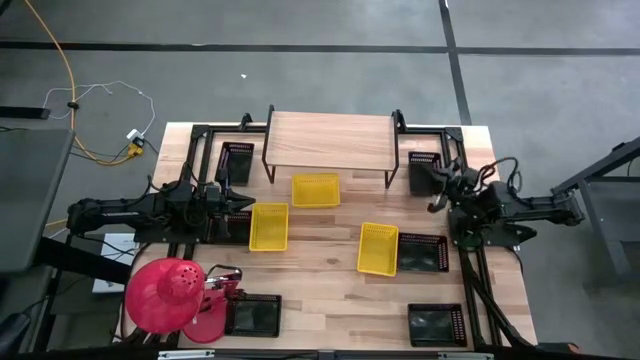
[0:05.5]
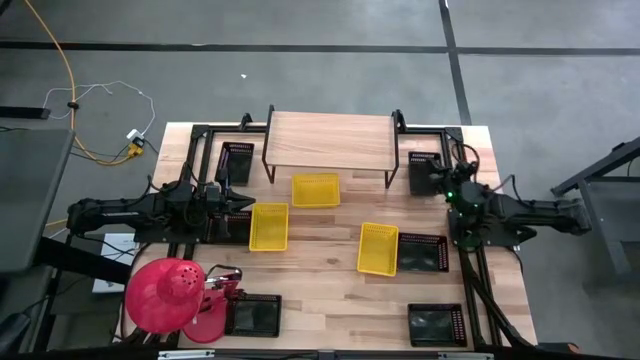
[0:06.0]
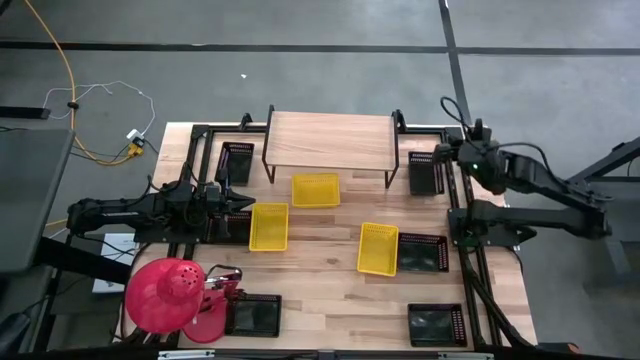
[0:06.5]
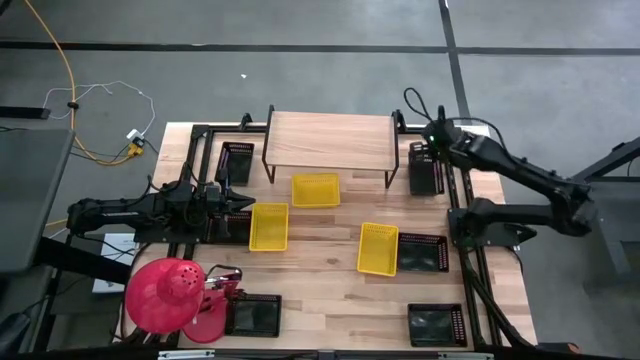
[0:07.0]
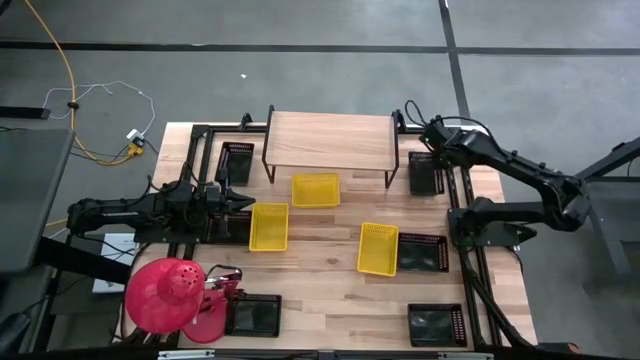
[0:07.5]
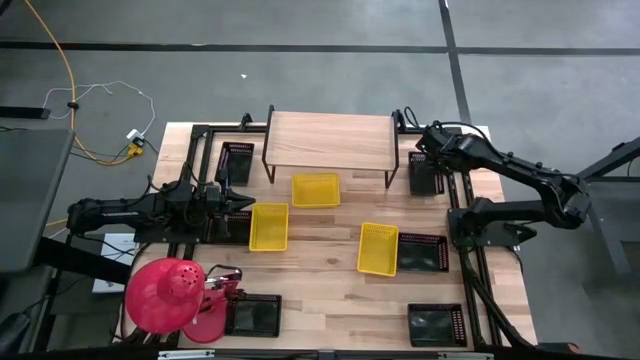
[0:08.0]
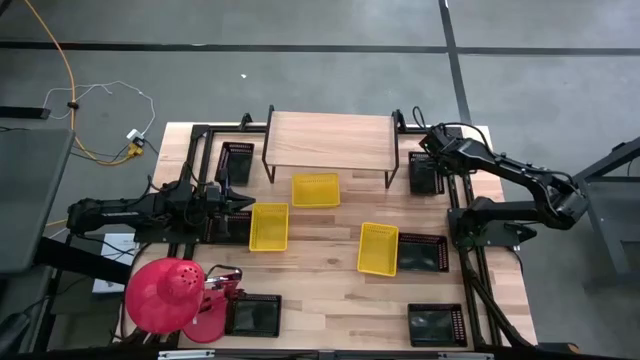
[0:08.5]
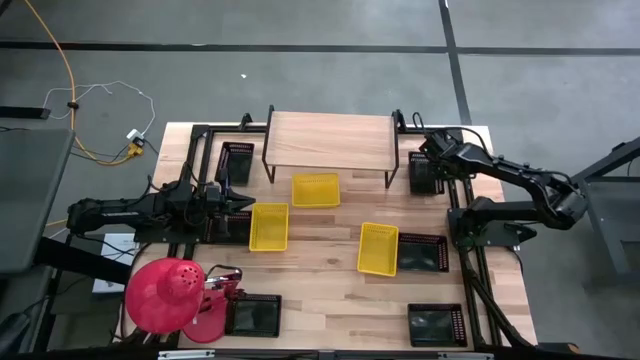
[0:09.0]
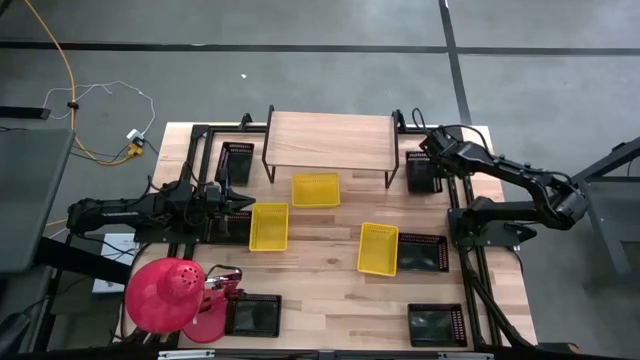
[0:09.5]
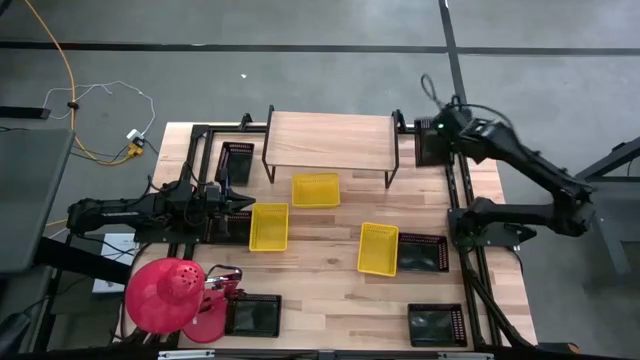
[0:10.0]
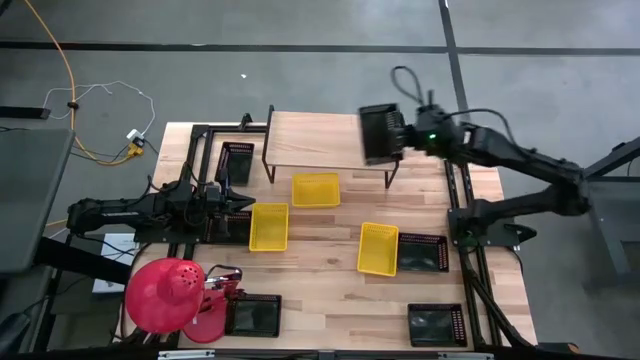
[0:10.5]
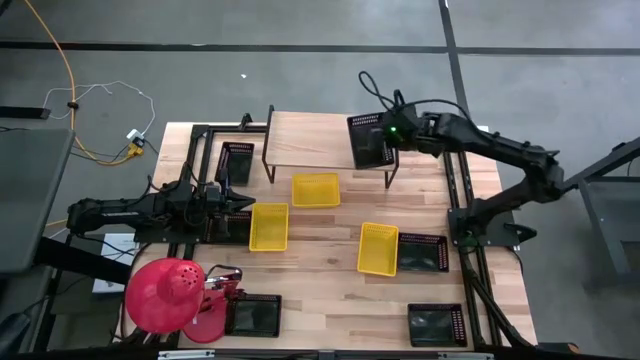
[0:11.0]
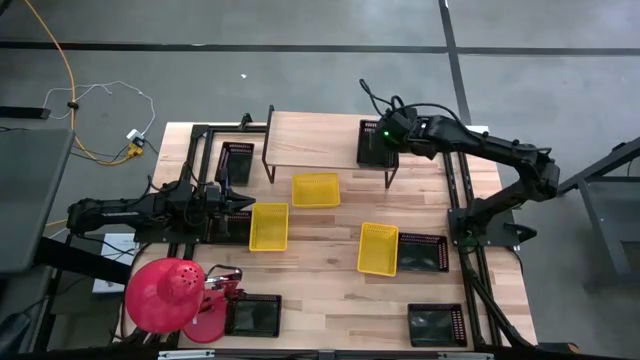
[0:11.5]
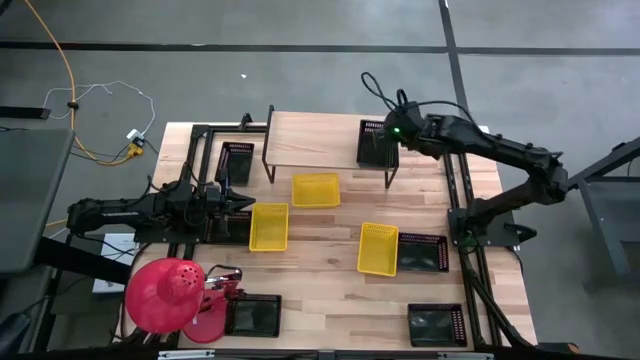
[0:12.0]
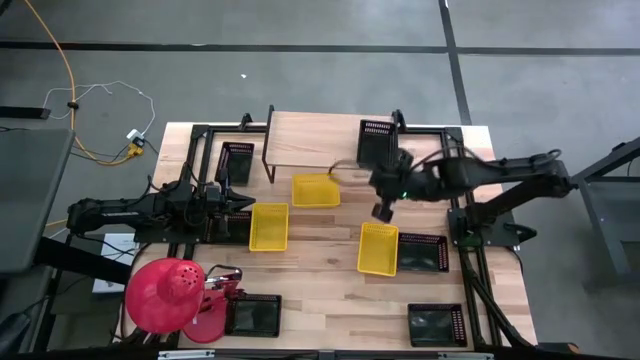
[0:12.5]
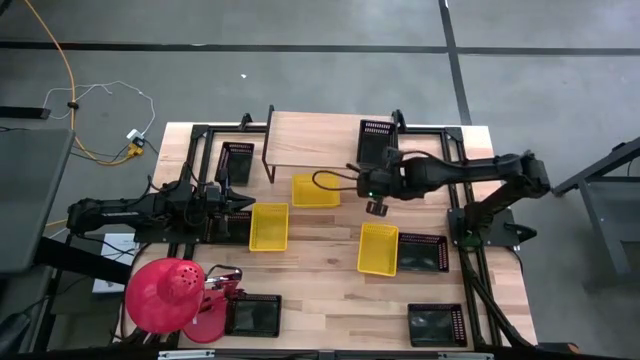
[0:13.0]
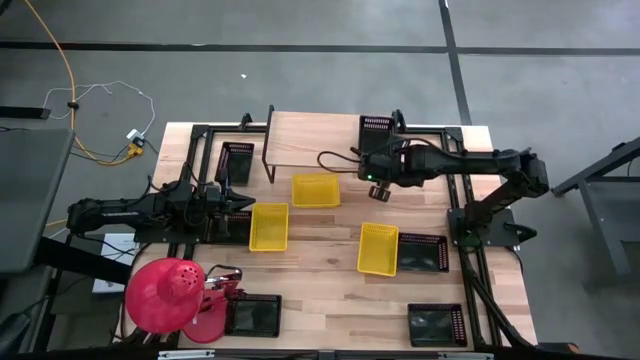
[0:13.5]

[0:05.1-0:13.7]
Task: Stack baskets on shelf by color
Put the black bin on the shelf

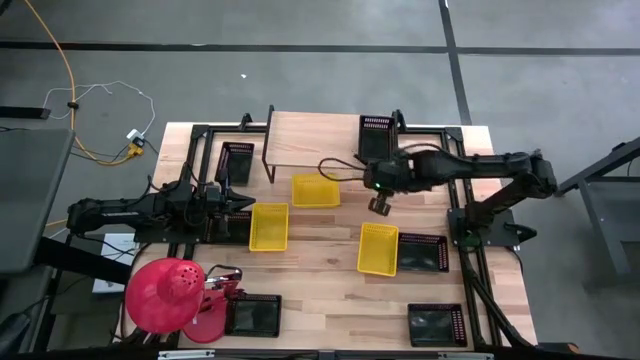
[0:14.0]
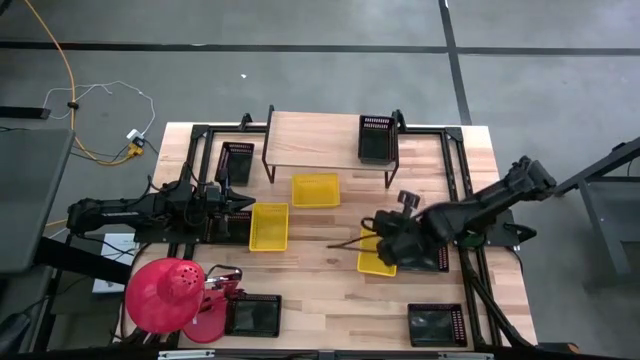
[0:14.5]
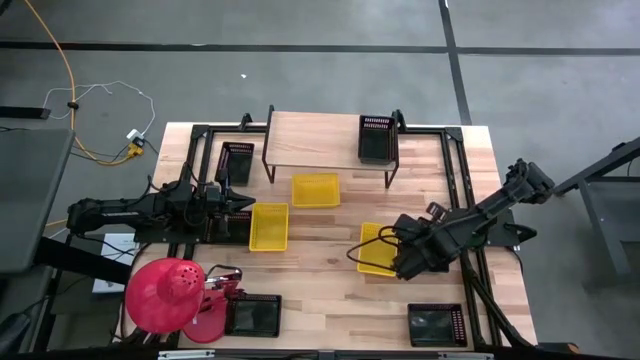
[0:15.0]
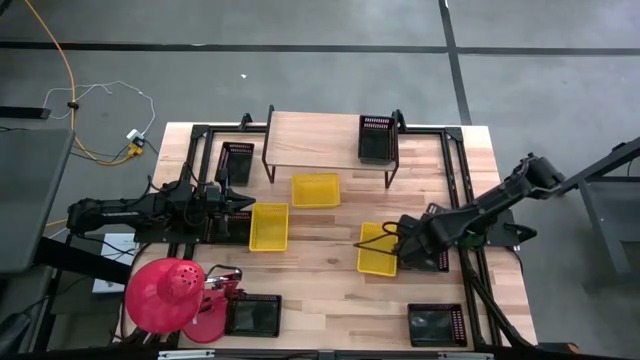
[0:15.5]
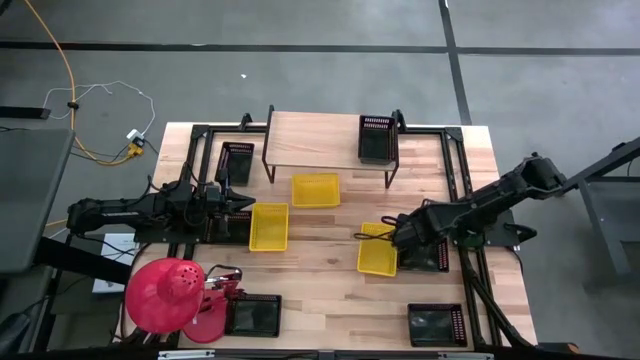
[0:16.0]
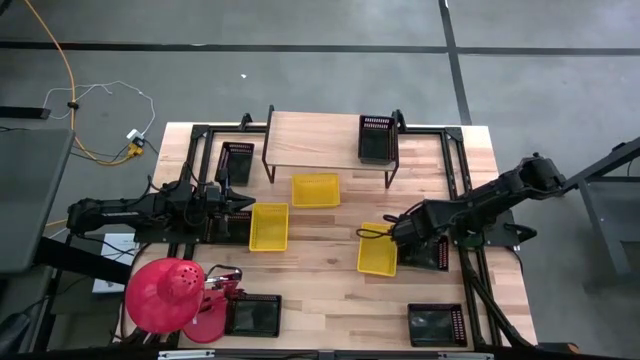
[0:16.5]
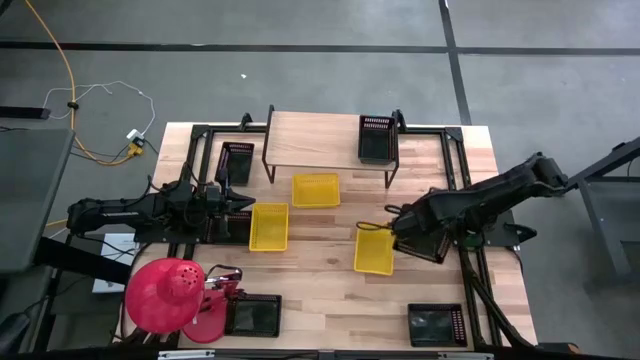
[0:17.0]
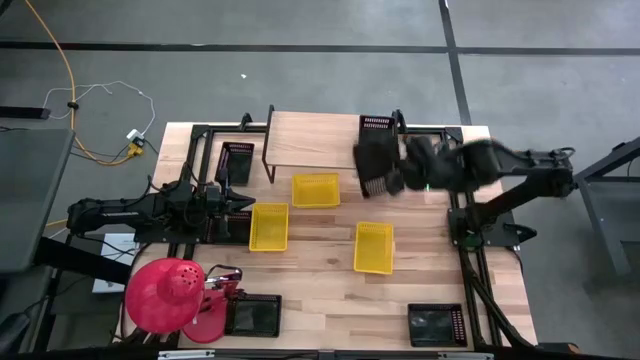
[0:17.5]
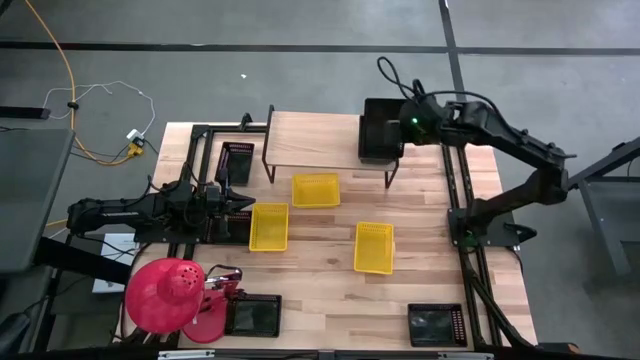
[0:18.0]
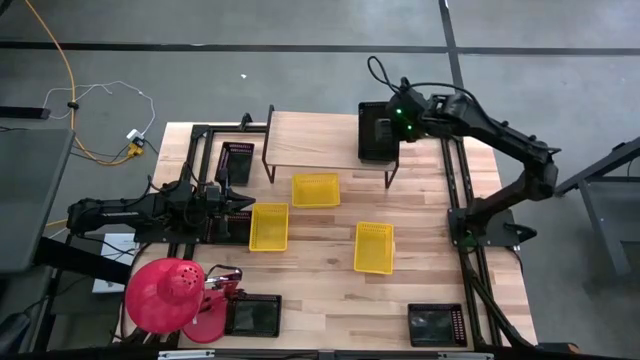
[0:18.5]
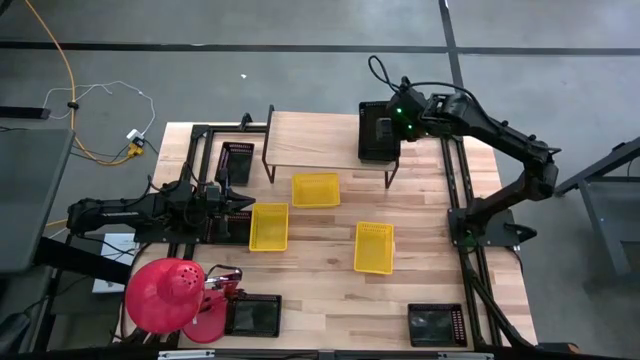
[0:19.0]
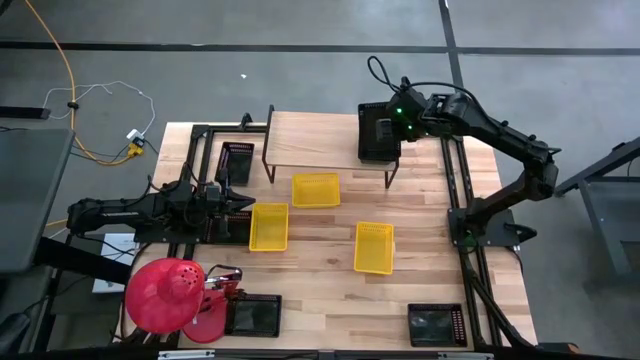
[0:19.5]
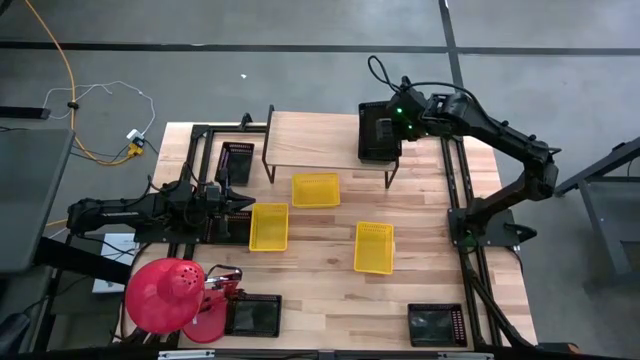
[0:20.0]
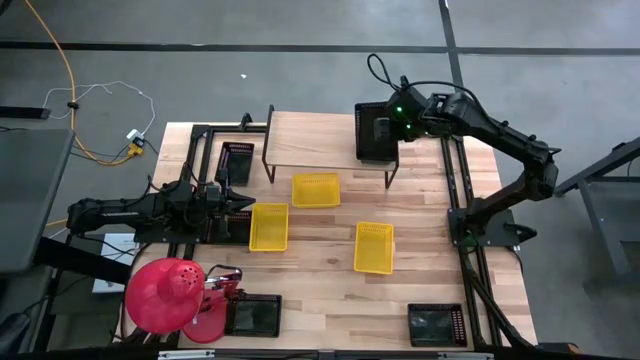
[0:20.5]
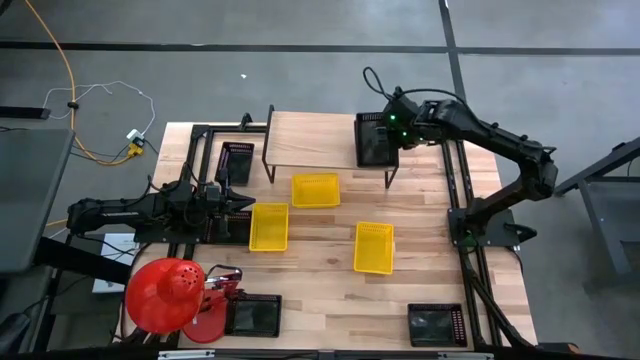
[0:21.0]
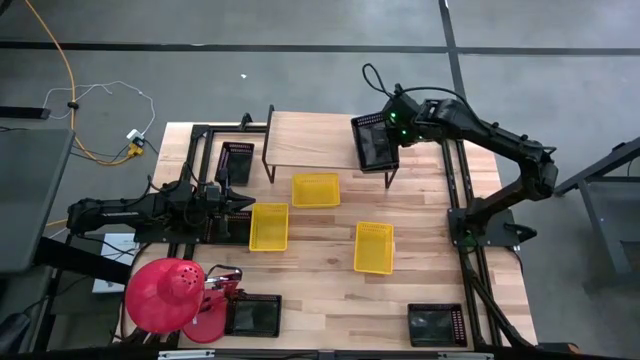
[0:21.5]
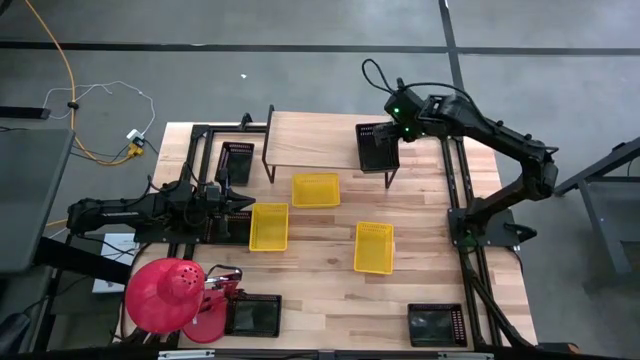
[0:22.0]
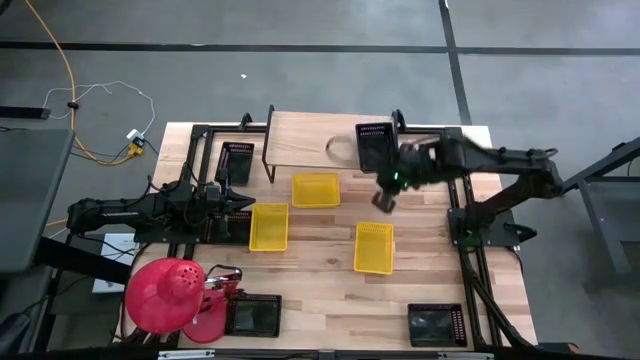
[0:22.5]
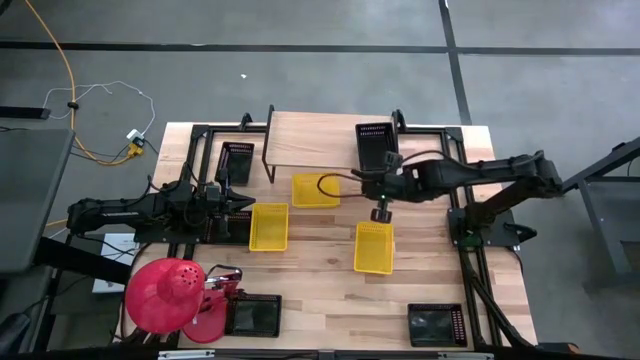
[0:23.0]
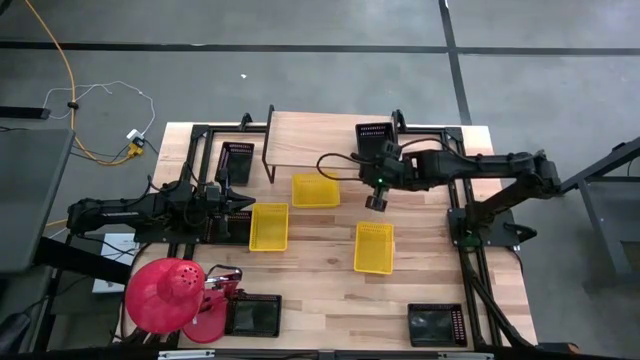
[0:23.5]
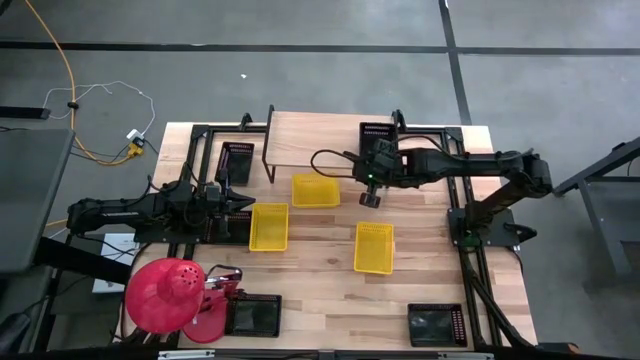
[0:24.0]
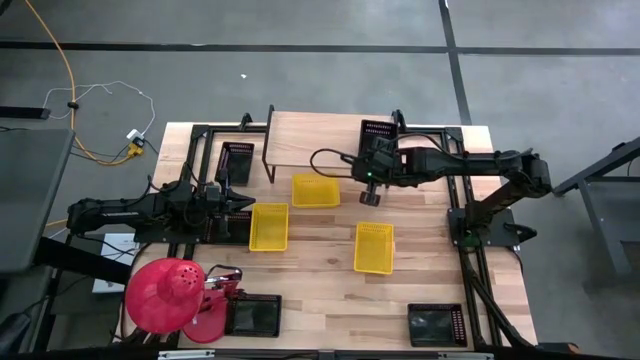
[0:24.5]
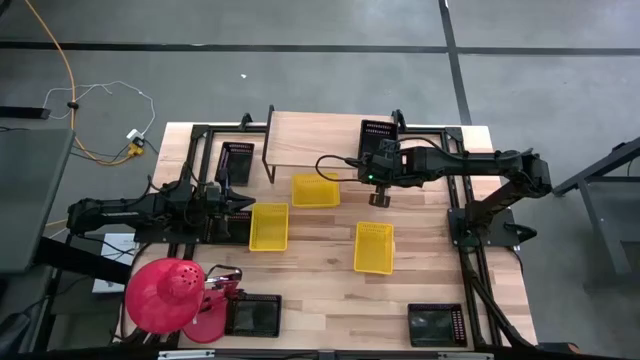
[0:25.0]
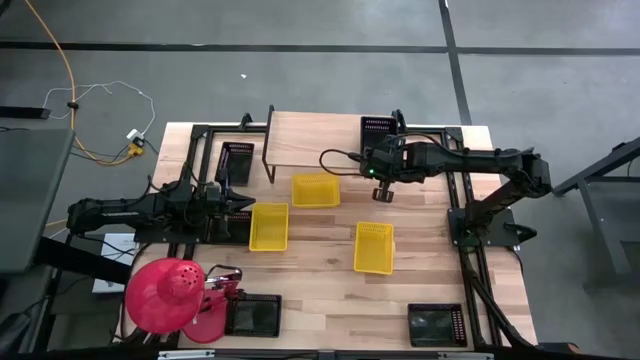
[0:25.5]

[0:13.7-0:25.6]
Stack the black bin on the black bin on the shelf

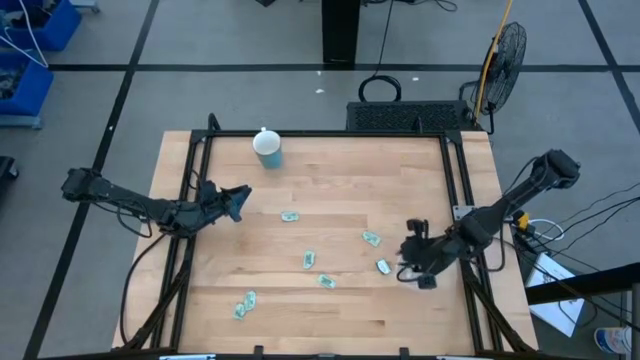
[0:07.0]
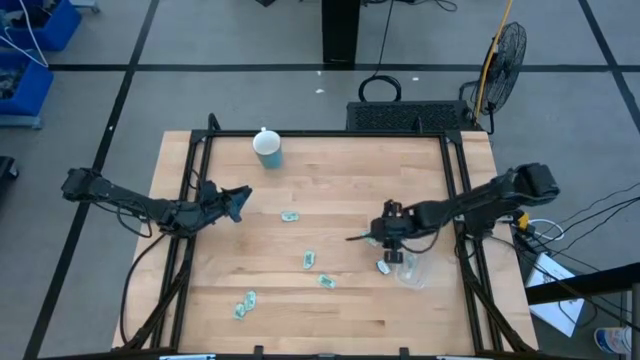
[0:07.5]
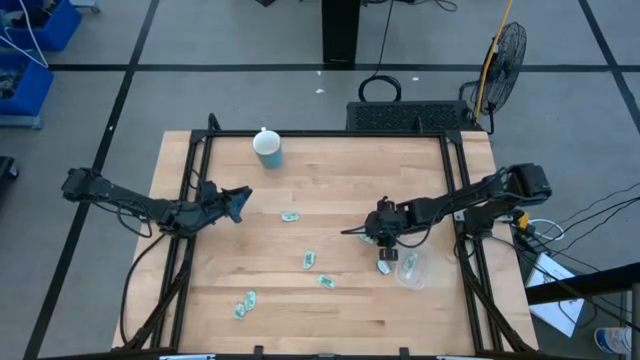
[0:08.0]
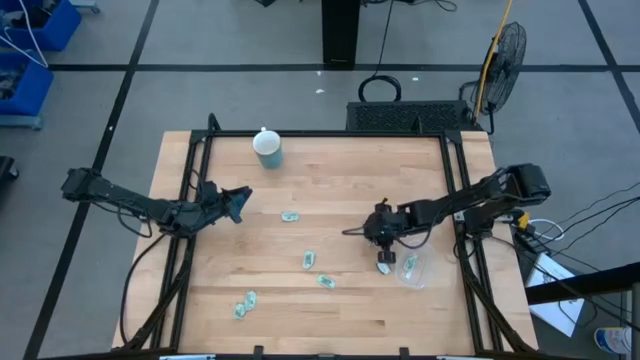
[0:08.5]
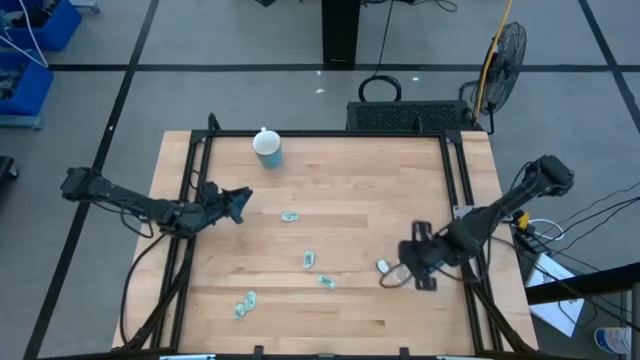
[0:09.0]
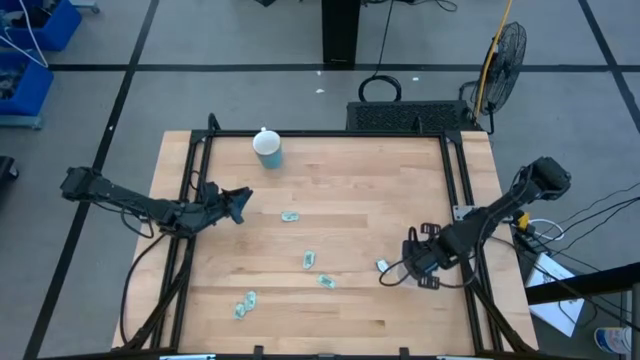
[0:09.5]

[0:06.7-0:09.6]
Task: Pick and place Stevia / Truvia into bins
Put the stevia packet into the transparent container
